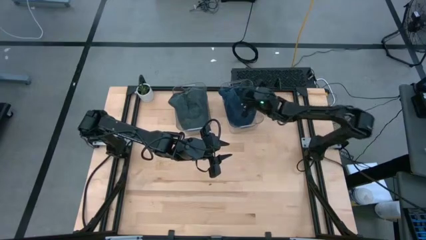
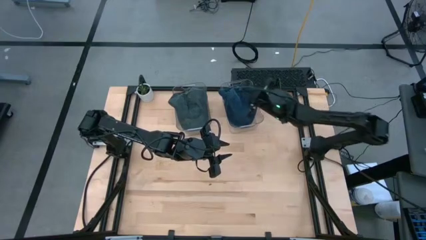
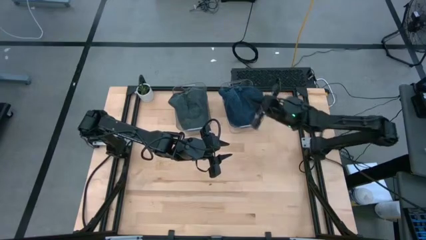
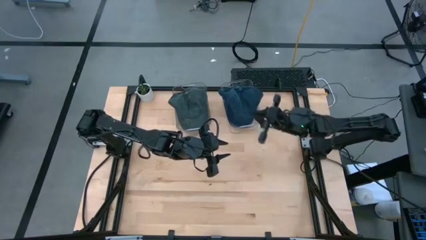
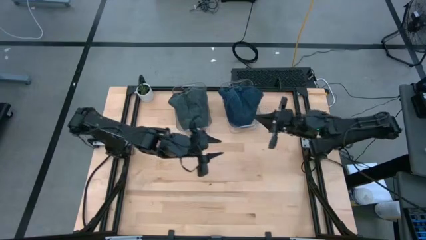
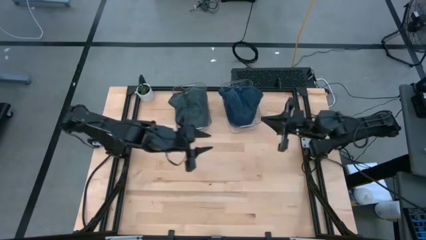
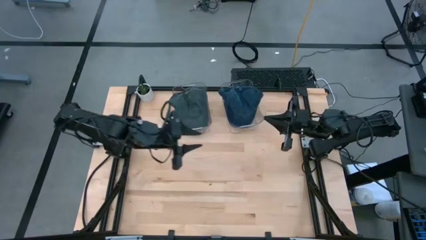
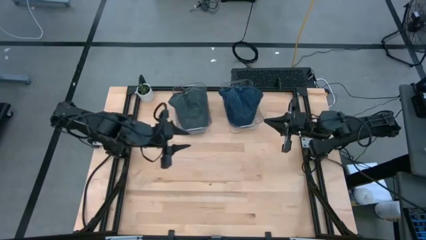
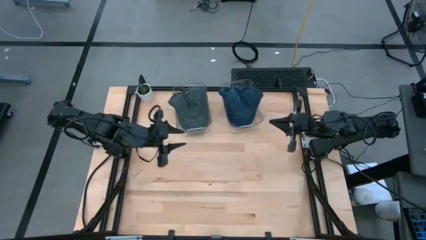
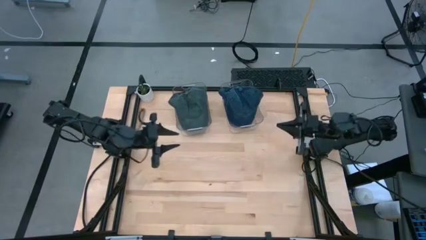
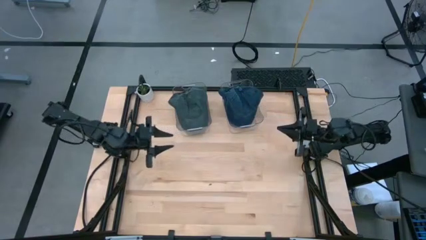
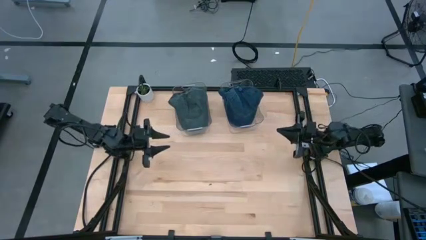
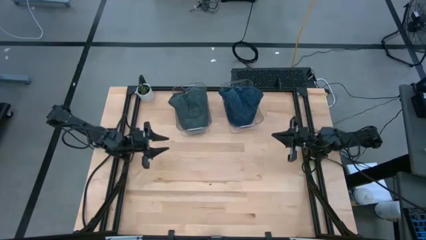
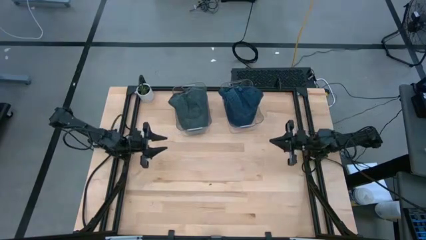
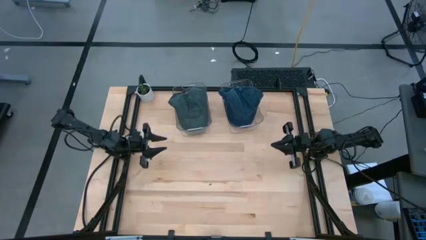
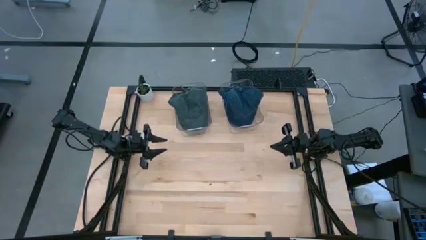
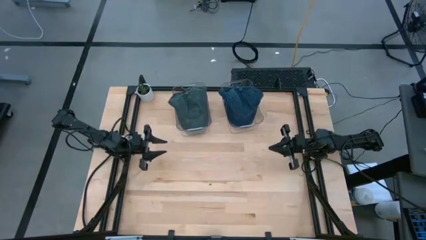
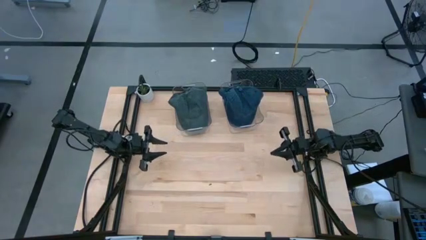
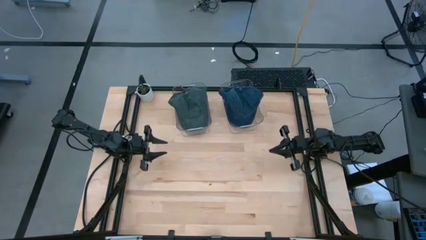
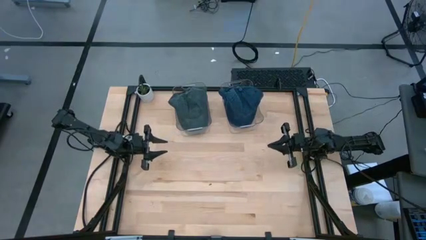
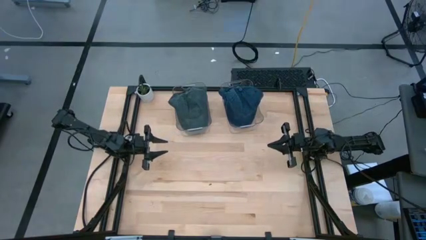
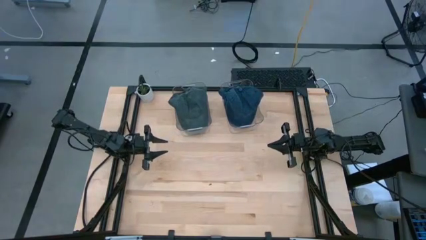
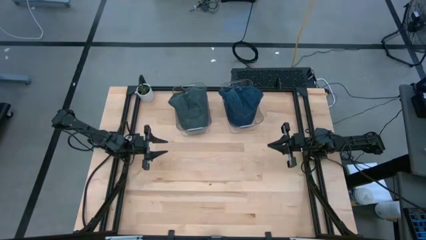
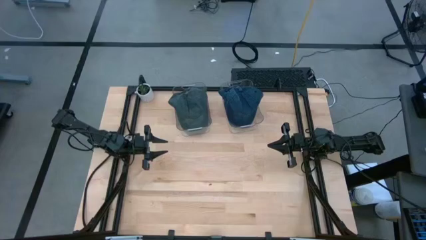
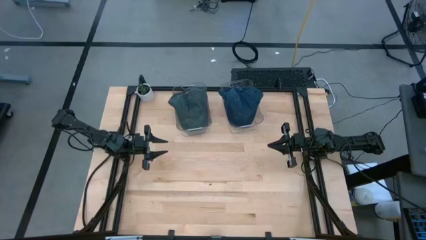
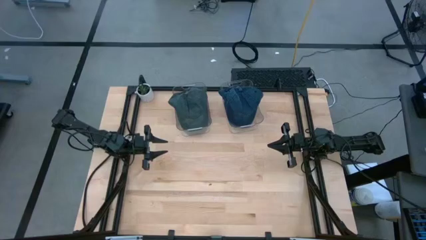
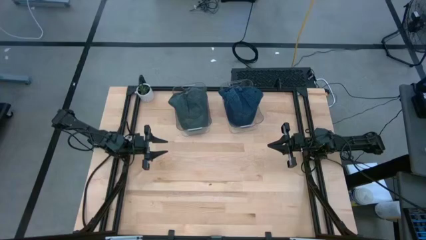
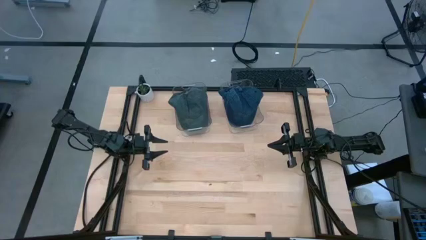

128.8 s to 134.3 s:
Task: Pick & Place hat
Return to Home Position

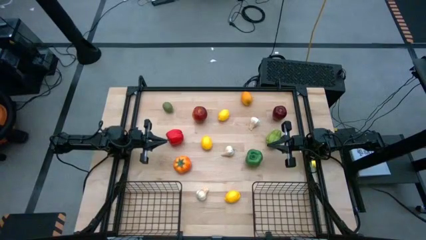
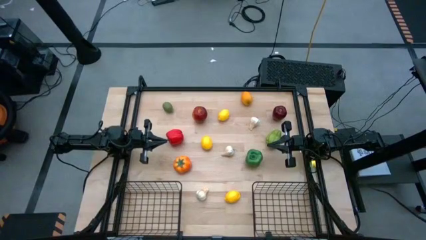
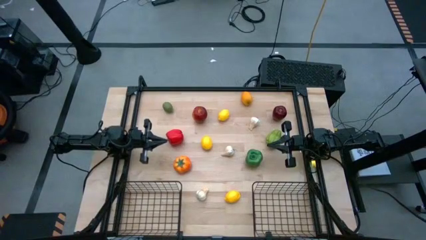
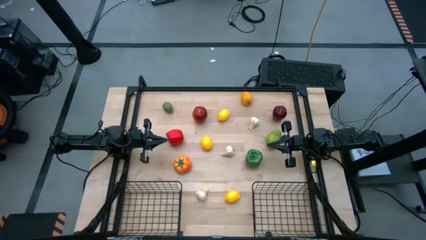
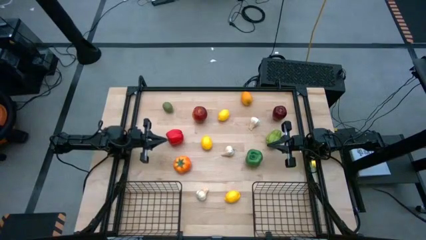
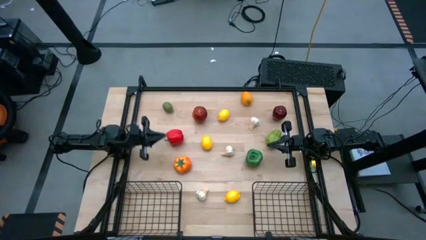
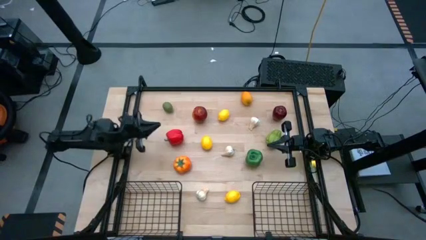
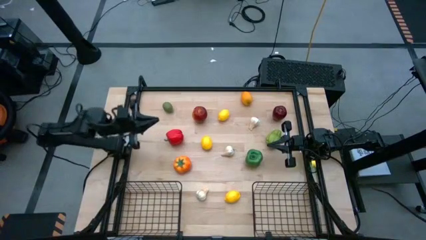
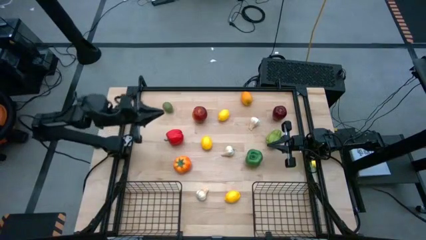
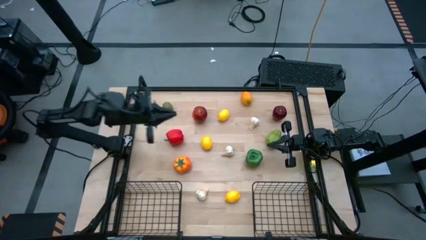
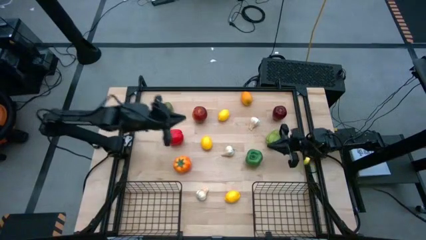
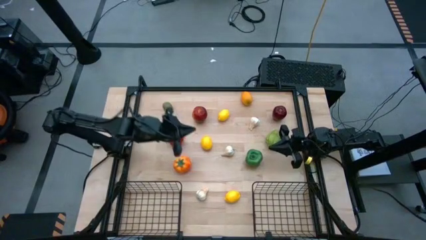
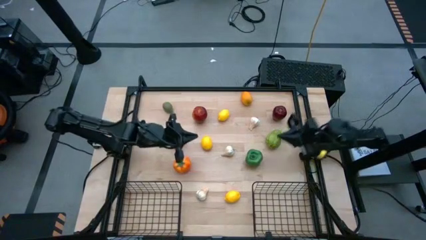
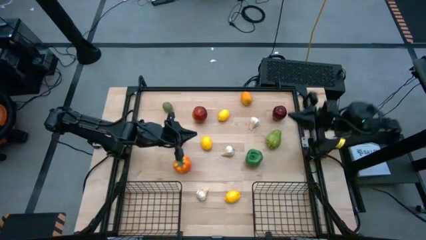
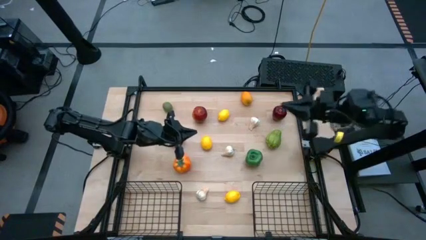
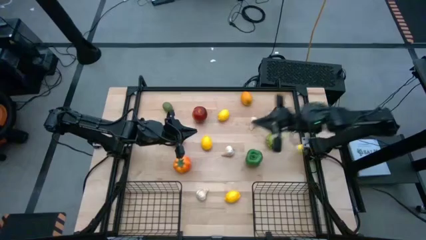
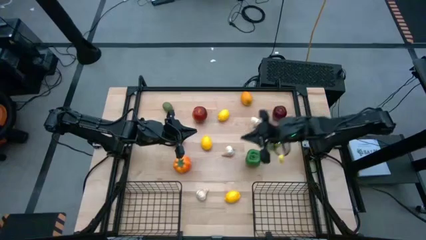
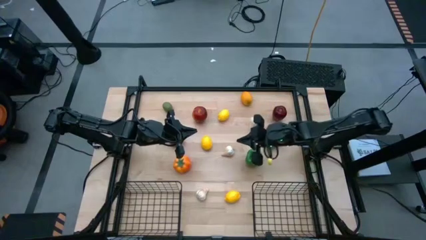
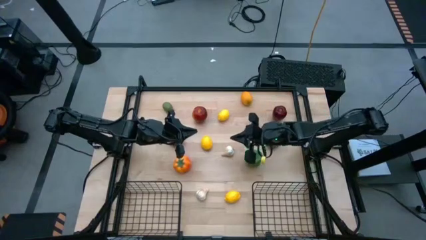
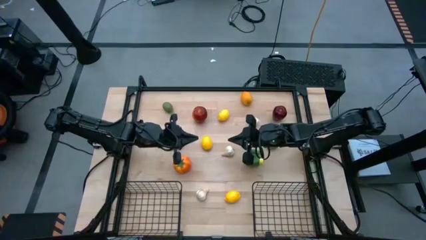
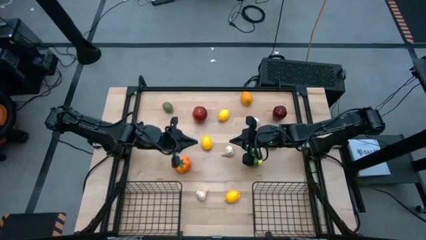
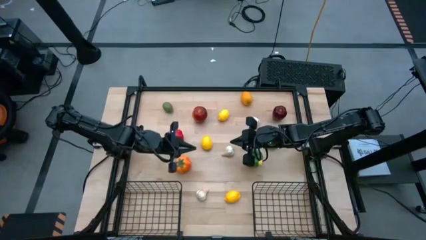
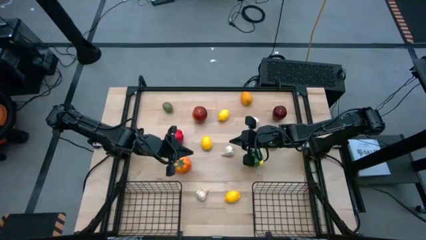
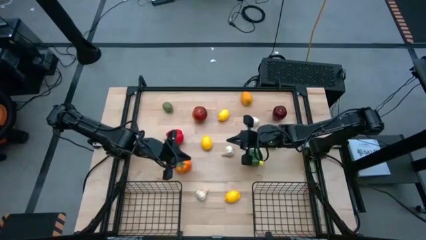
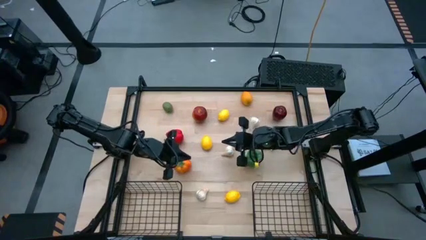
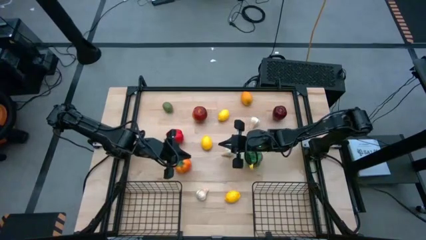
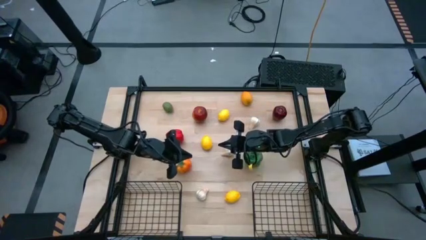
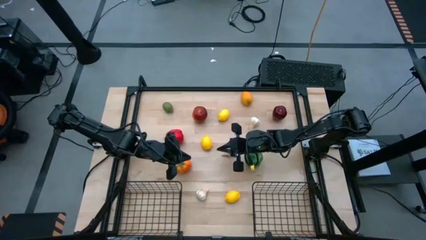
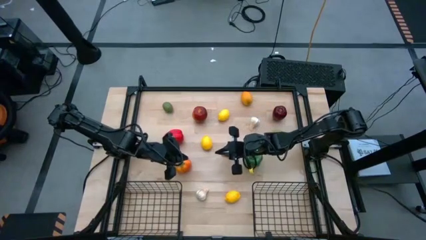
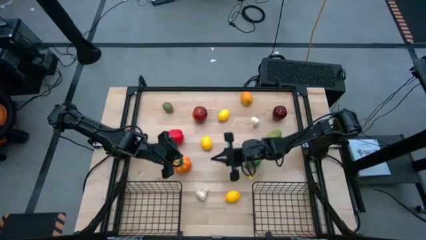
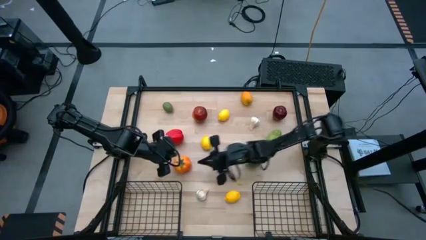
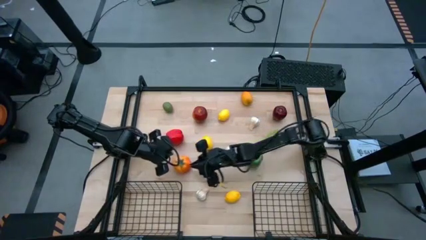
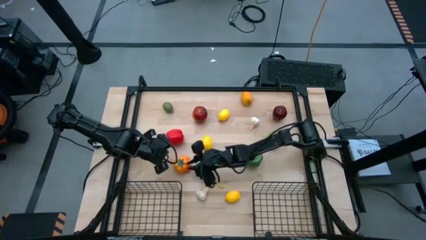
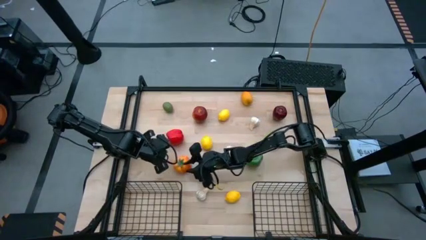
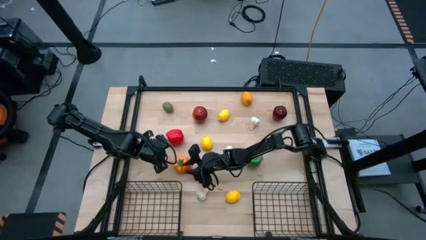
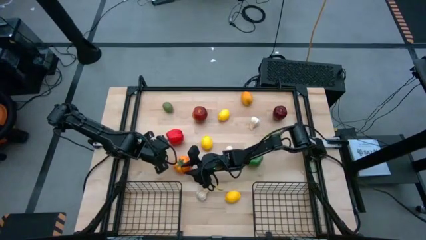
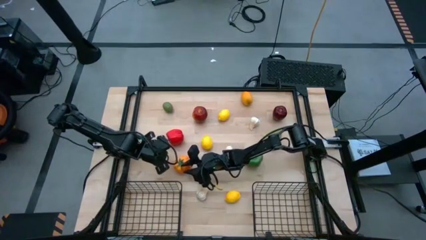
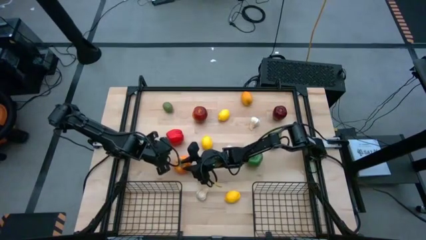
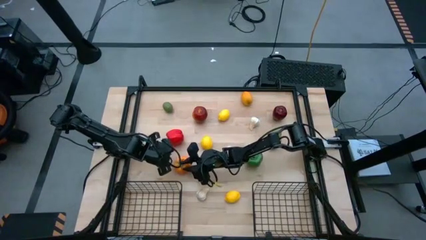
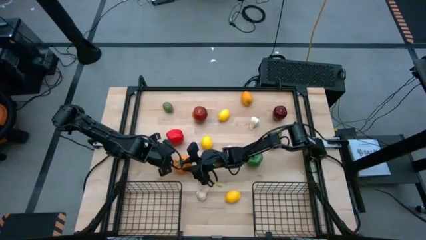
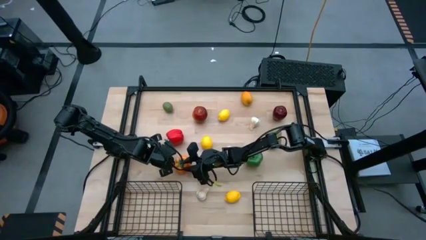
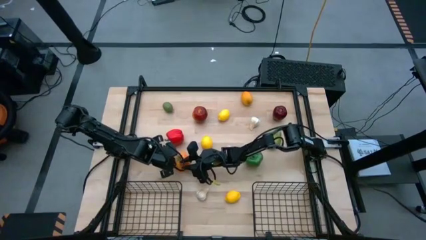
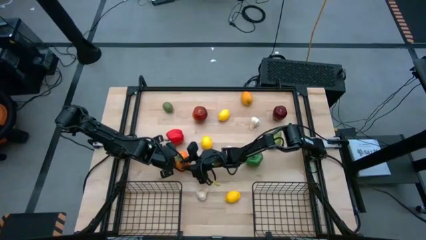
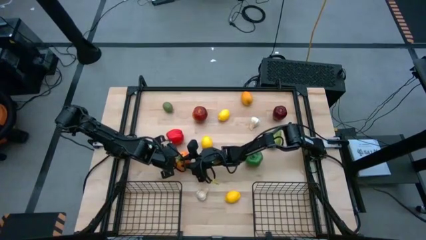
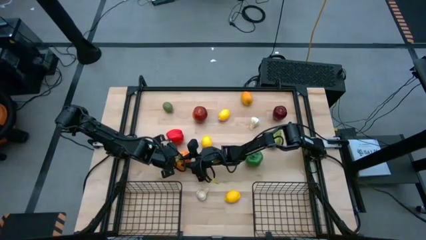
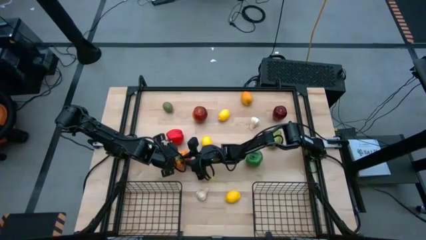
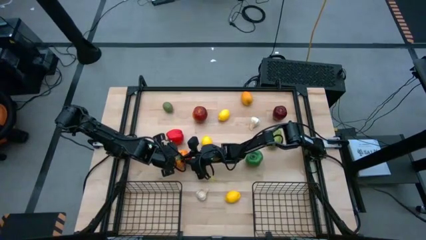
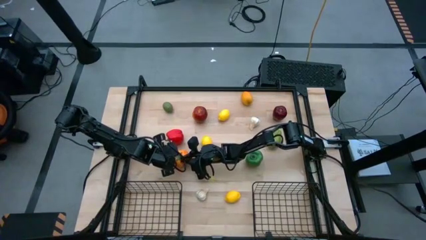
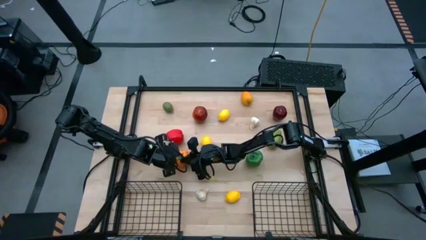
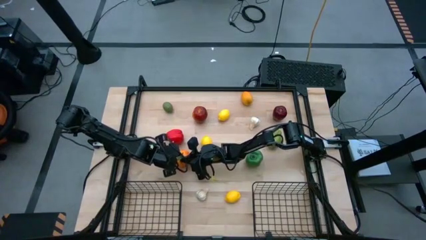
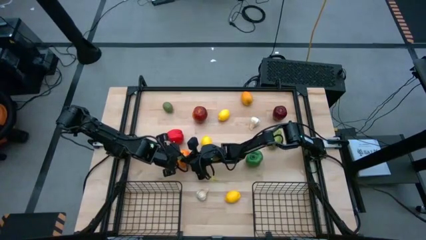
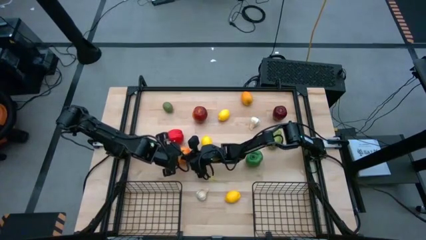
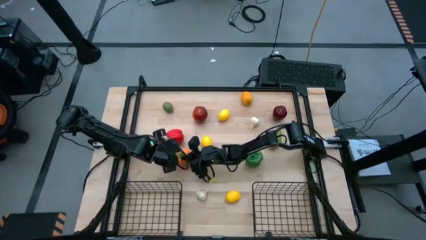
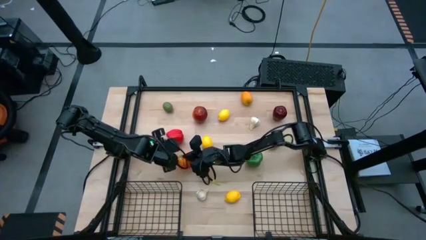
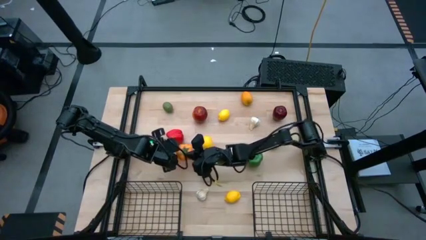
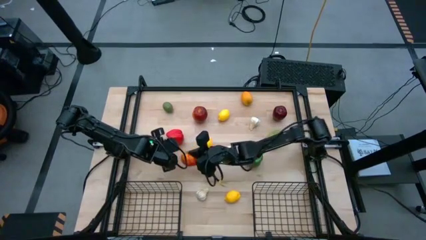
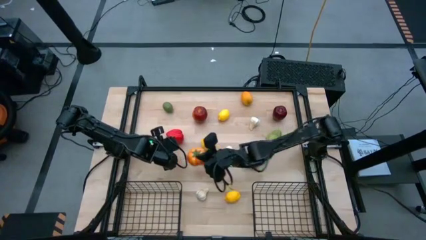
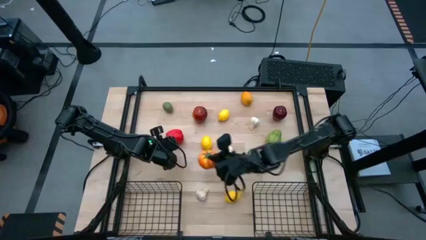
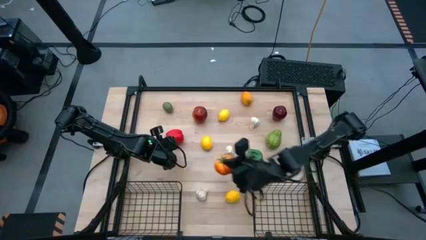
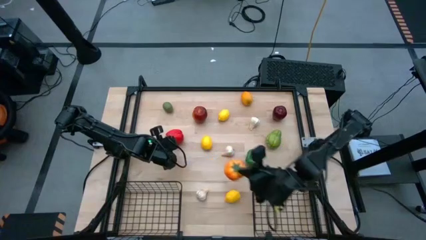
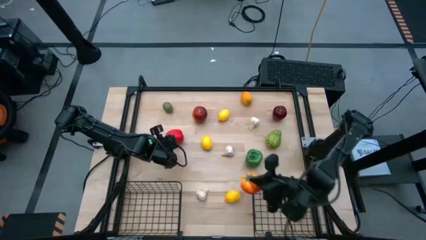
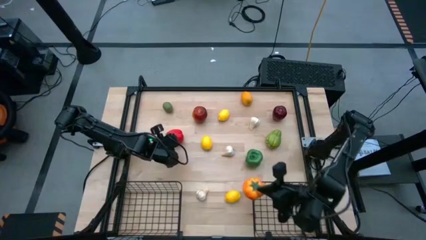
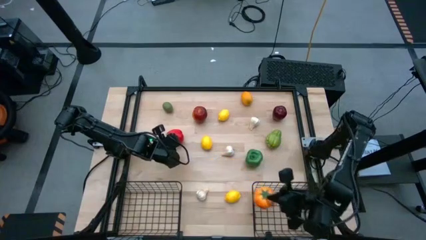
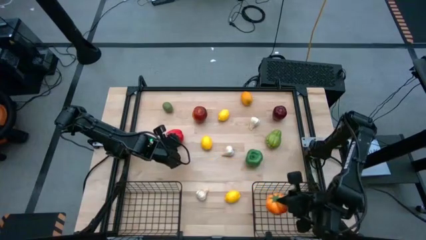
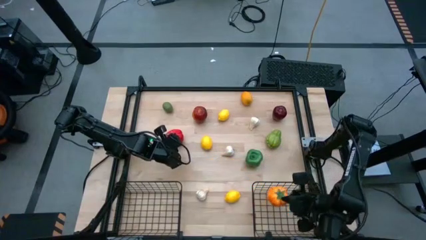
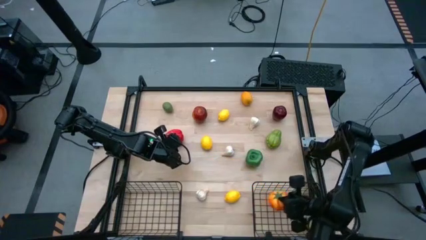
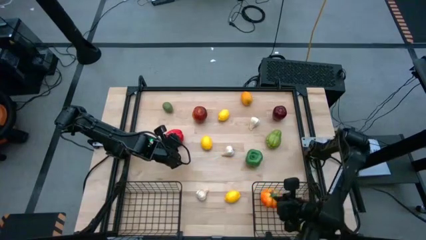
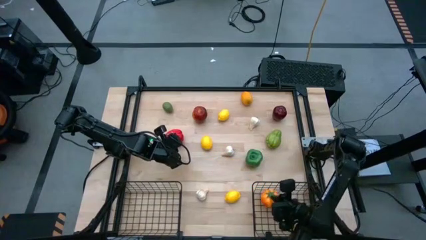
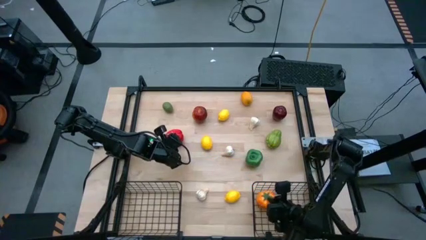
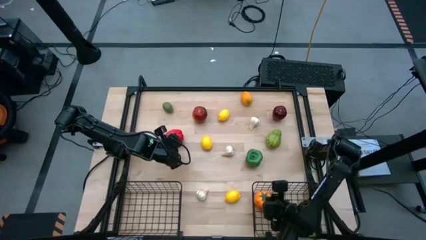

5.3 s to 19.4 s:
Task: Sort produce into baskets
Put the orange tomato into the right black wire basket
